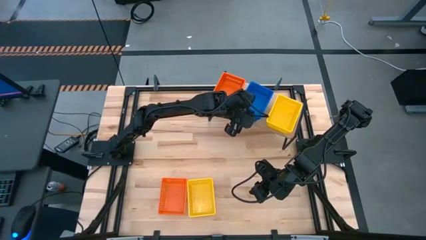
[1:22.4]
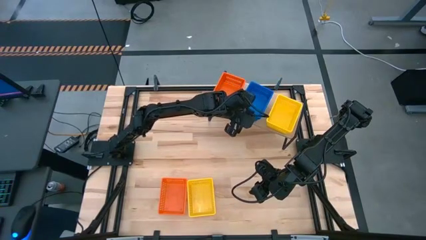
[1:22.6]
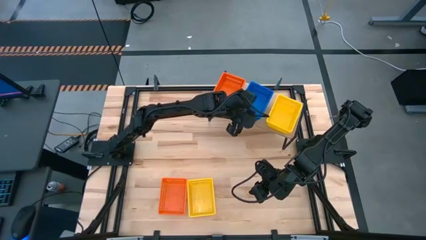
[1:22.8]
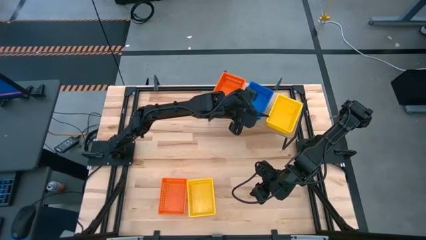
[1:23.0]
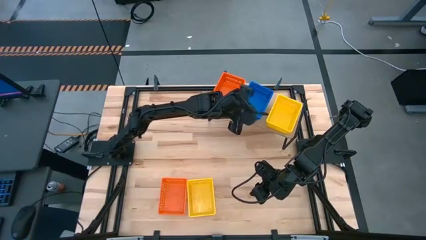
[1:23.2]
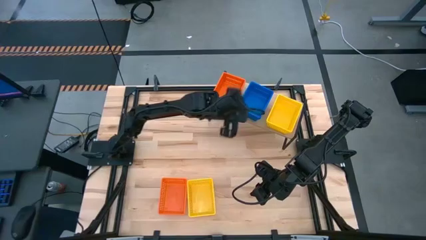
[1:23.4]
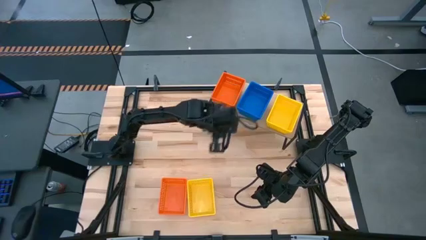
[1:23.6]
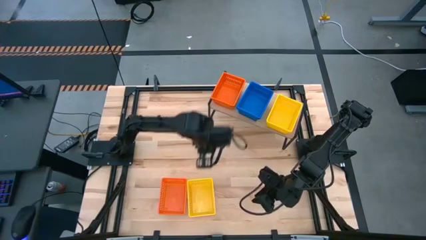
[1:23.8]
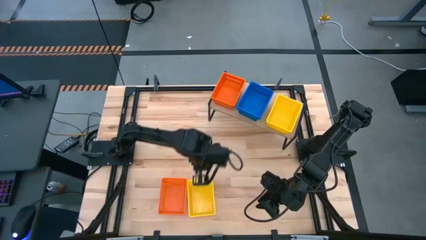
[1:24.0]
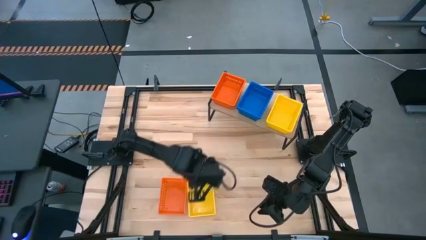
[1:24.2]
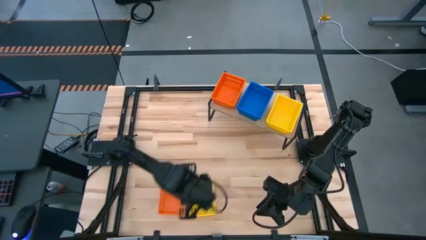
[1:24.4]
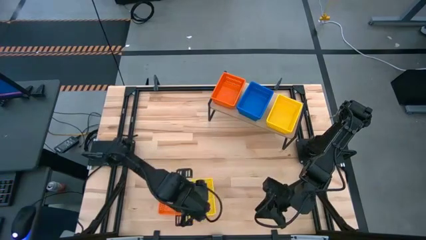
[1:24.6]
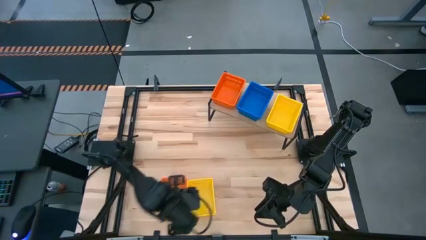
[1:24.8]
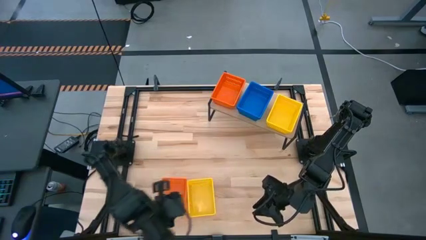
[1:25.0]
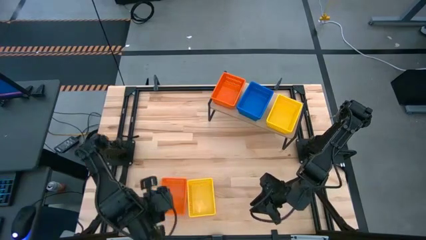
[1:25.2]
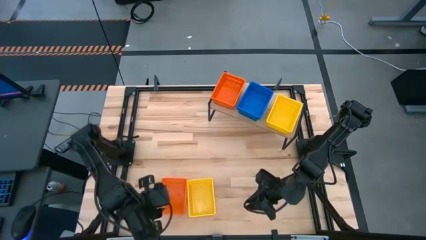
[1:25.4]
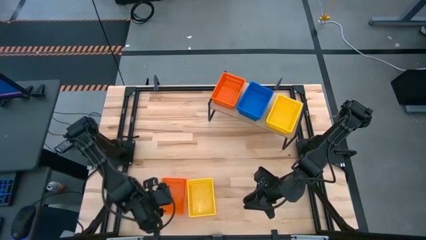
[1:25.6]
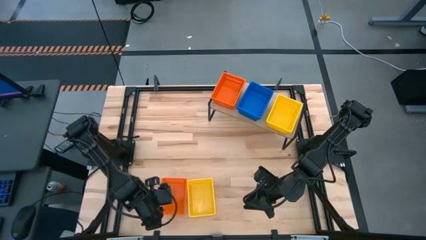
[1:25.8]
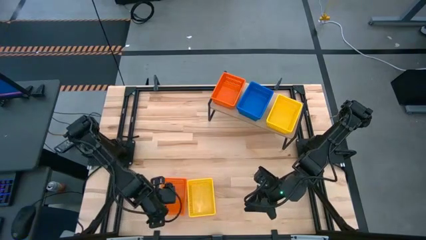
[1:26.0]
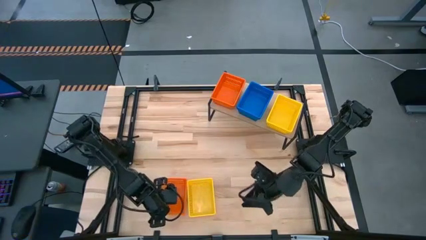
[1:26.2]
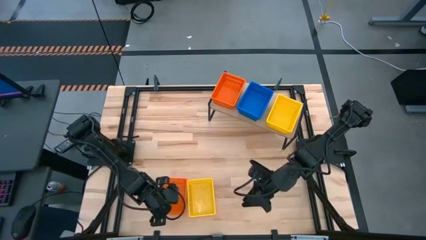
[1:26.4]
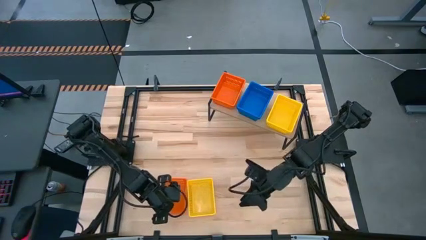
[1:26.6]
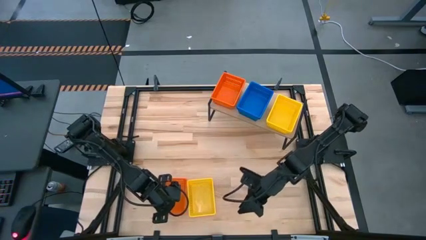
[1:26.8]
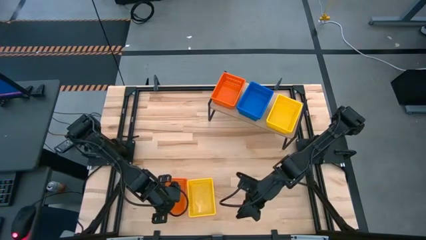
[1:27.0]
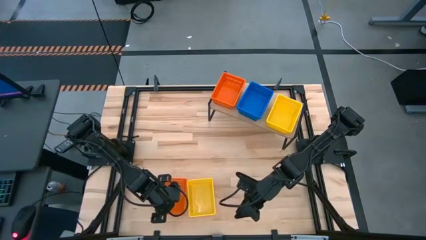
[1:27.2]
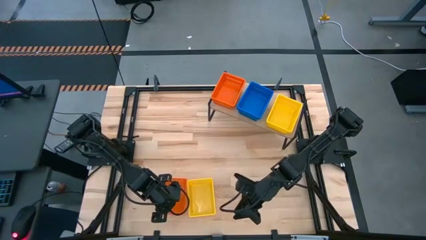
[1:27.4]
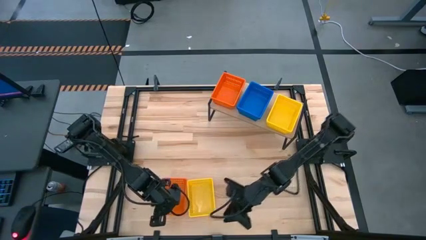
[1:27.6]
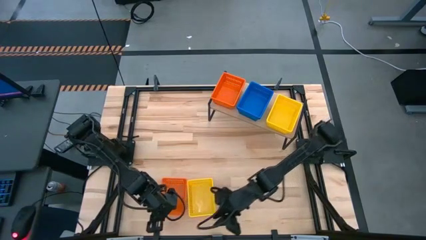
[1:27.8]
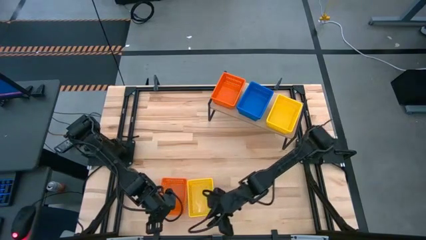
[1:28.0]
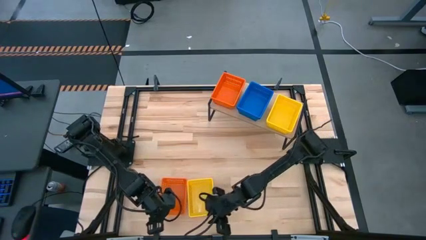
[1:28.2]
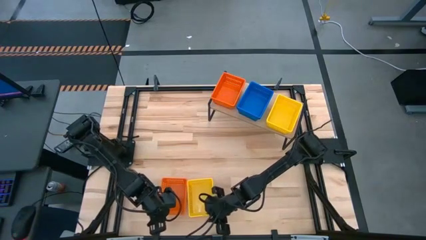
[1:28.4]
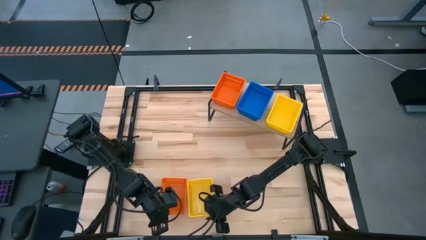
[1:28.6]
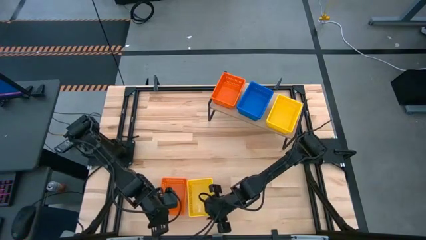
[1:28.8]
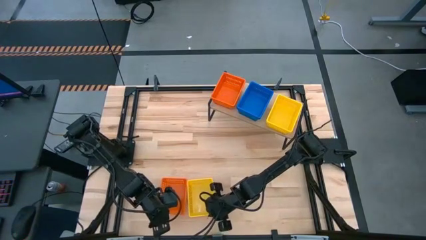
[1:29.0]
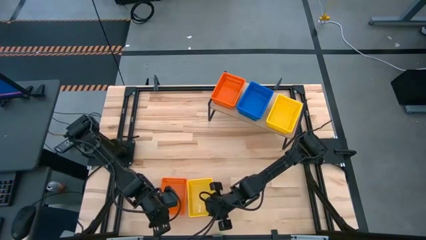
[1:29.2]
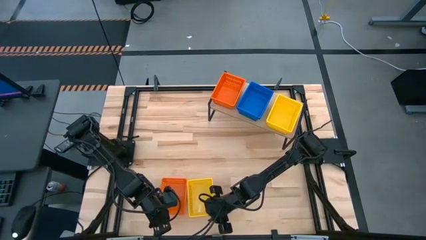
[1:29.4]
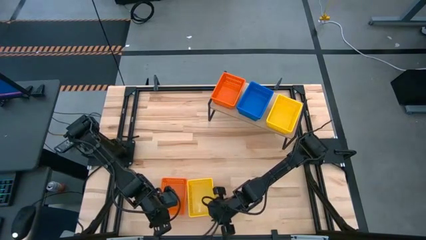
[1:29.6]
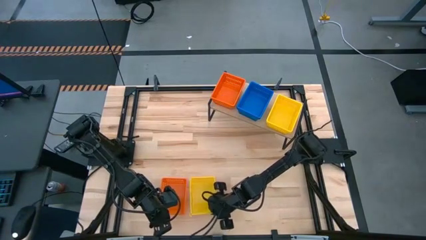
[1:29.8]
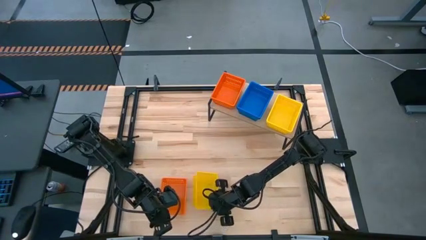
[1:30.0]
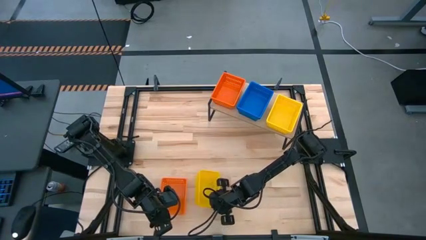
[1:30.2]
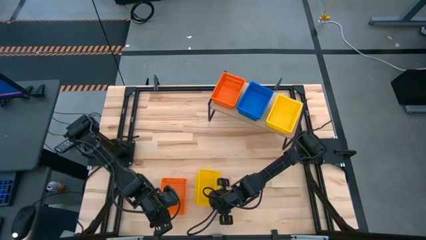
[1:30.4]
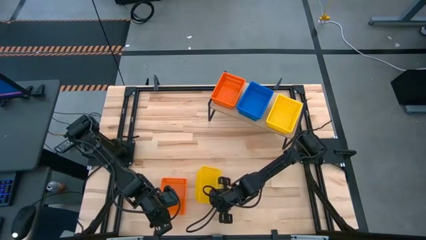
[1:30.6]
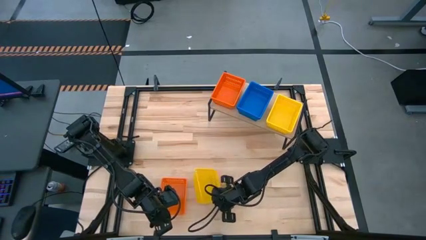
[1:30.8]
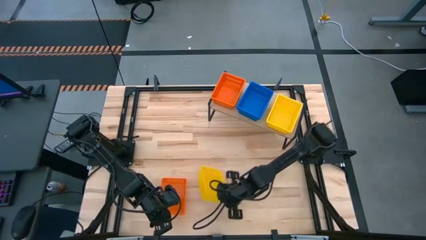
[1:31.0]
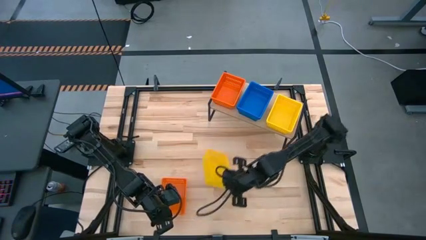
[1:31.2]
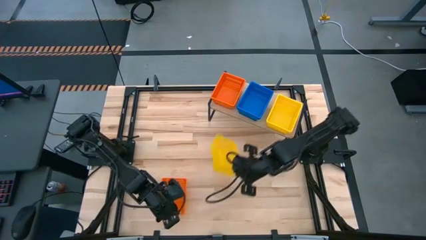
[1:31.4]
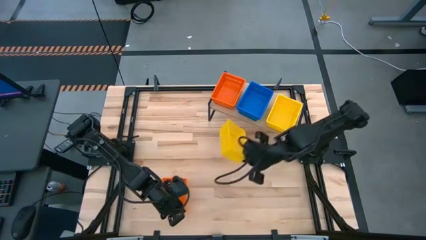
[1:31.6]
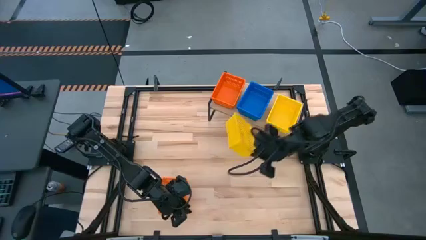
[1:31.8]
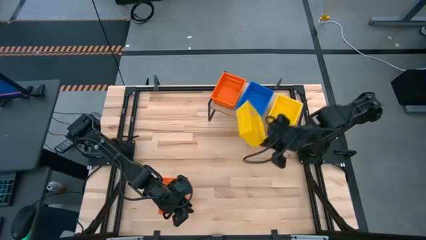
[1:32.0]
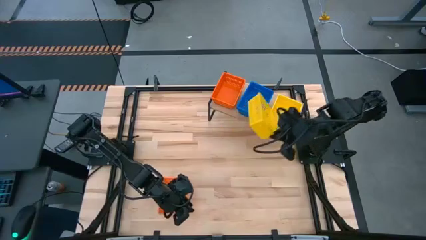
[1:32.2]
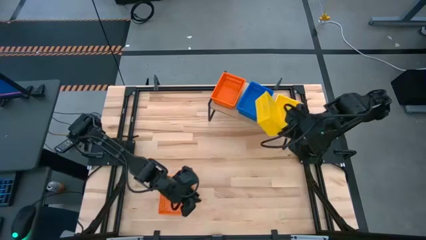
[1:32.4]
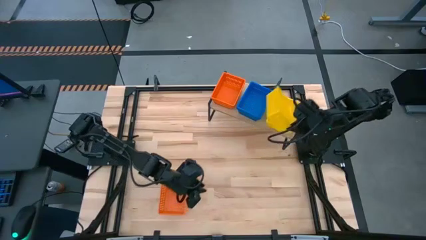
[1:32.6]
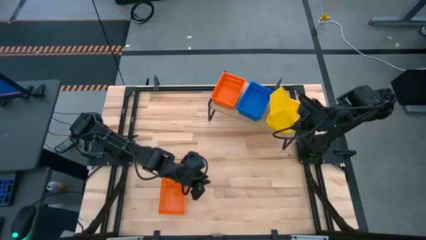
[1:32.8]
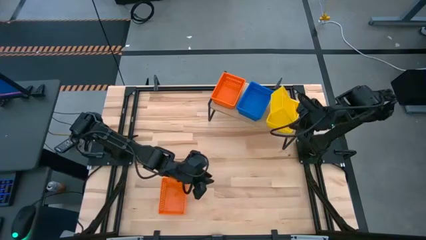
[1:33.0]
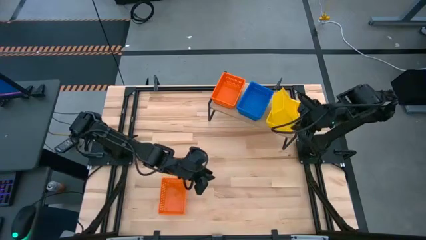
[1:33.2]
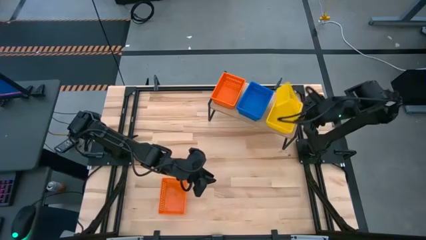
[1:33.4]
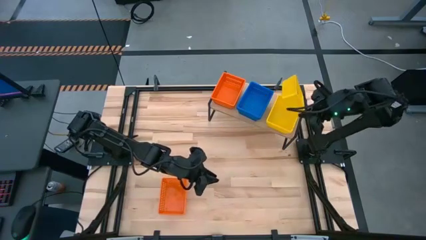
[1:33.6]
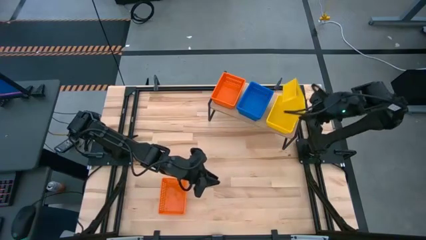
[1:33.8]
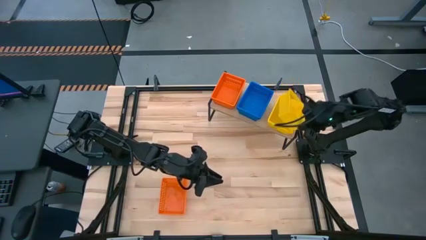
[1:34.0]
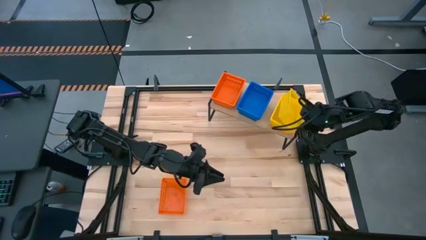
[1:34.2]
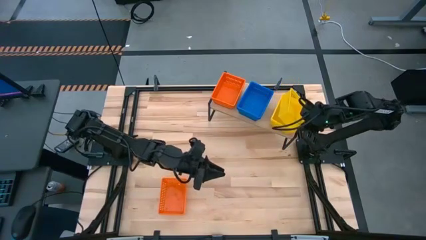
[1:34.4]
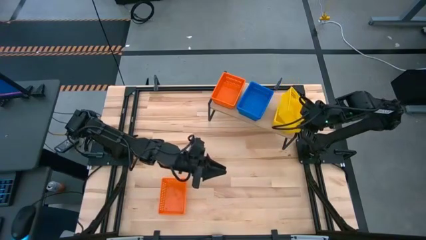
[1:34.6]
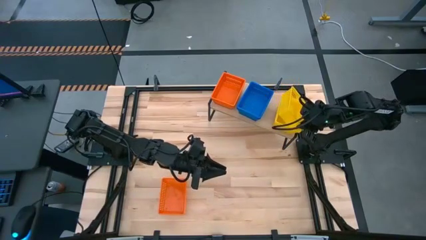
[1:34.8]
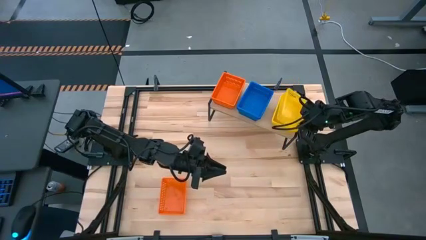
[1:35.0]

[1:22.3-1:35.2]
Task: Stack baskets on shelf by color
Stack the yellow basket on the yellow basket on the shelf

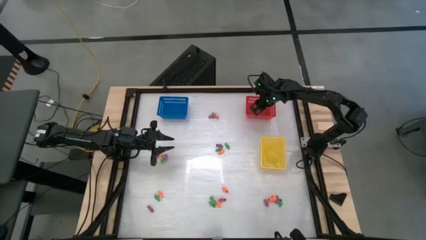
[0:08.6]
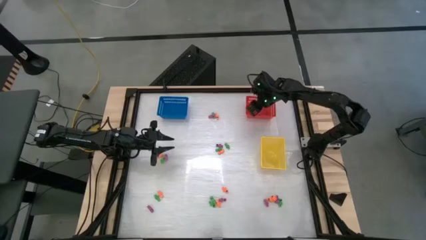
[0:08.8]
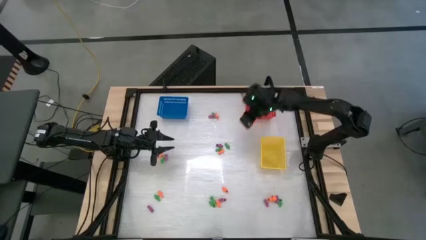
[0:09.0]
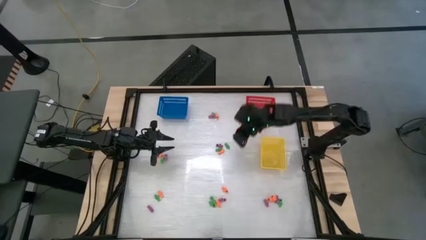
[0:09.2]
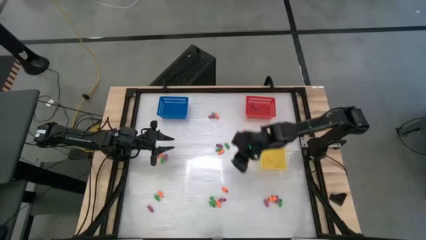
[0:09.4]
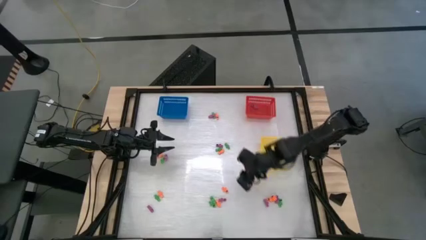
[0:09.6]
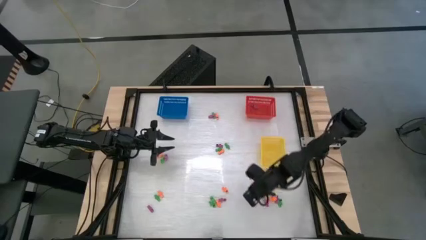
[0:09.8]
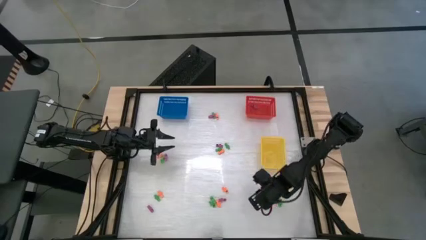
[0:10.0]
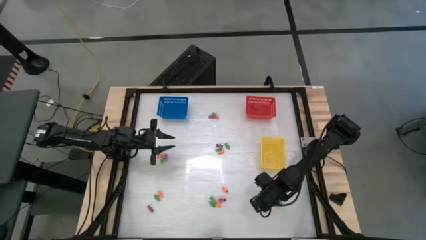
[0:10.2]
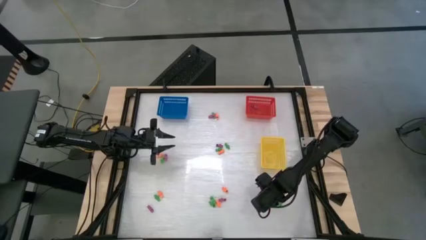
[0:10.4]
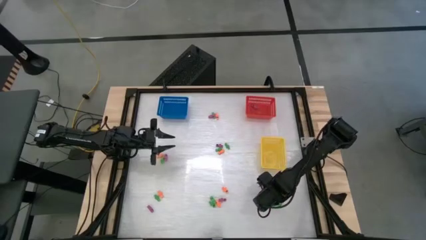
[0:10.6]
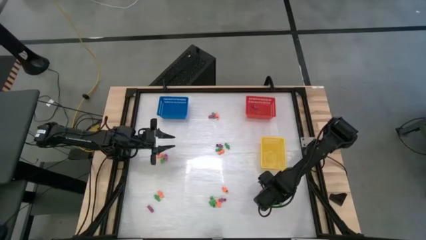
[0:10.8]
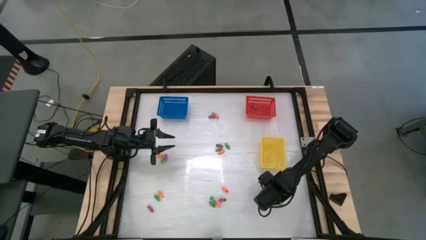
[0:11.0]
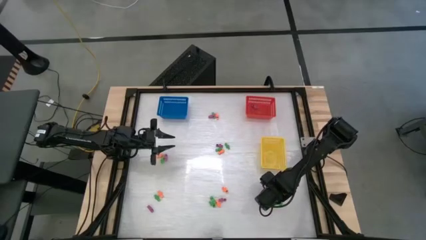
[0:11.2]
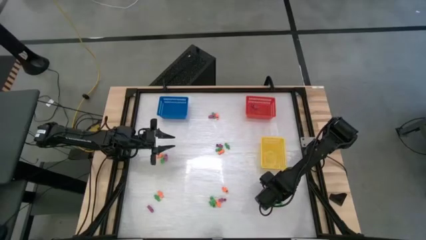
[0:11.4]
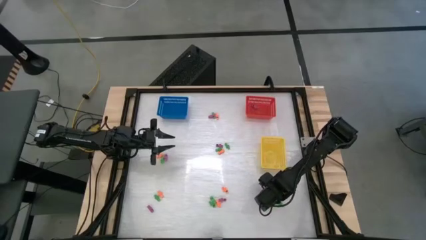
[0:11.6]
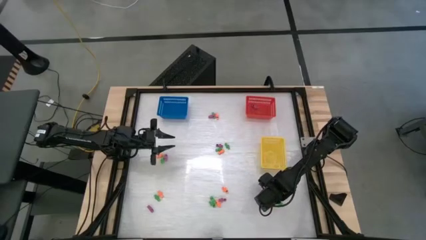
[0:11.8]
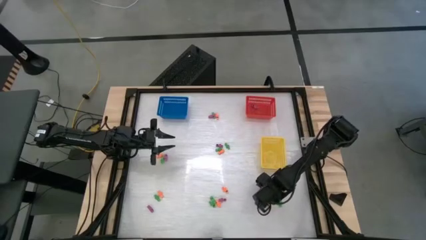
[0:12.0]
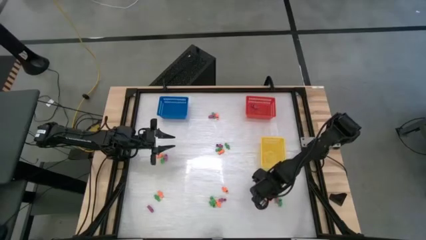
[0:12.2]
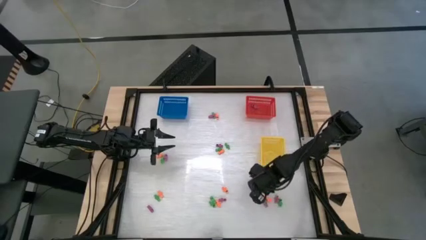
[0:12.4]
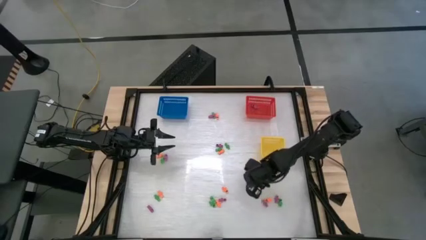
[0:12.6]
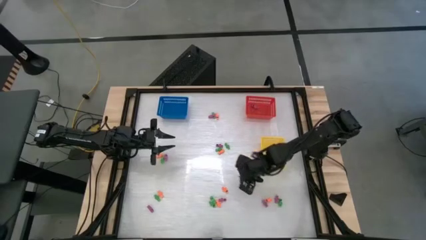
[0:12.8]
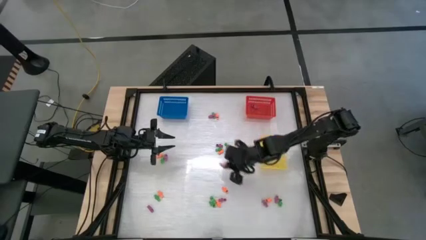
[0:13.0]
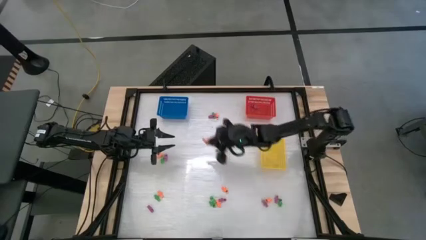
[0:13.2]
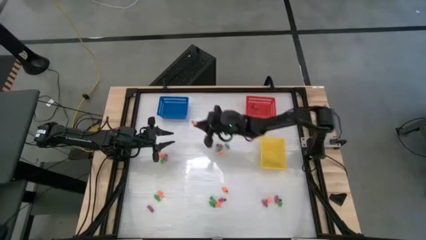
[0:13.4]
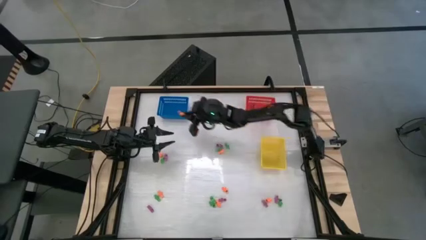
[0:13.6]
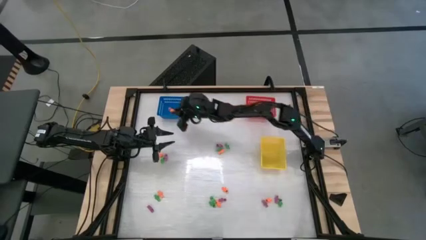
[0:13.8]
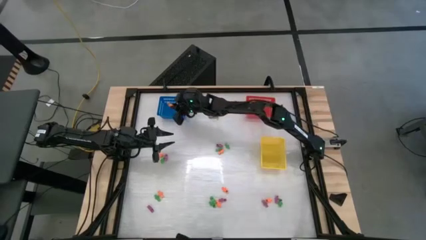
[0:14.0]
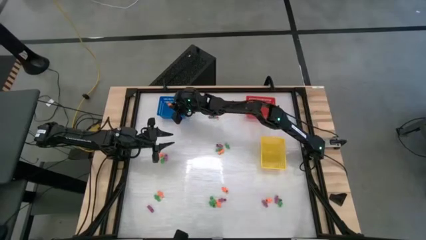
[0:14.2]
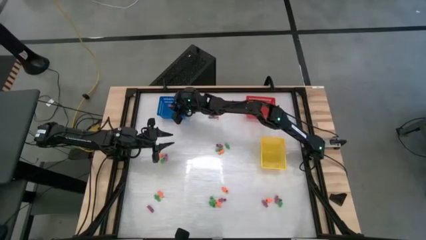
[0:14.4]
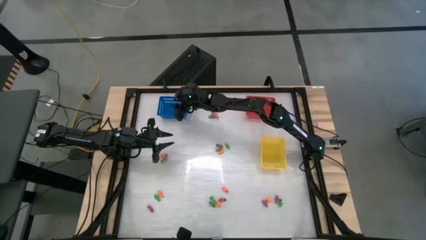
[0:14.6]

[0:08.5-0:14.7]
Task: Sort Halloween decoration
Put the orange skeleton toy into the blue bin
